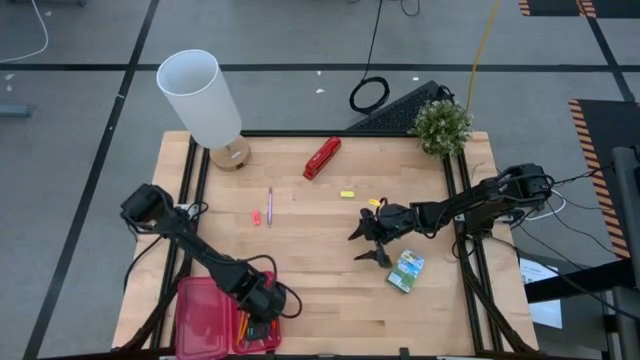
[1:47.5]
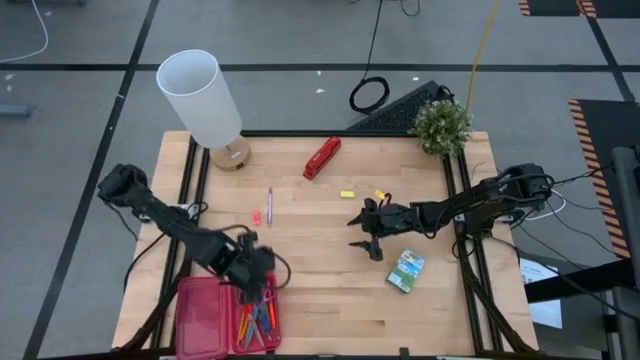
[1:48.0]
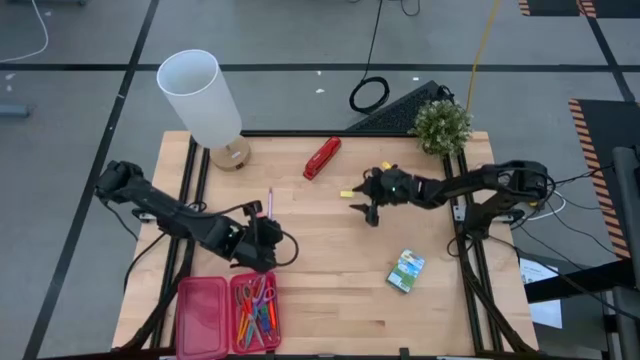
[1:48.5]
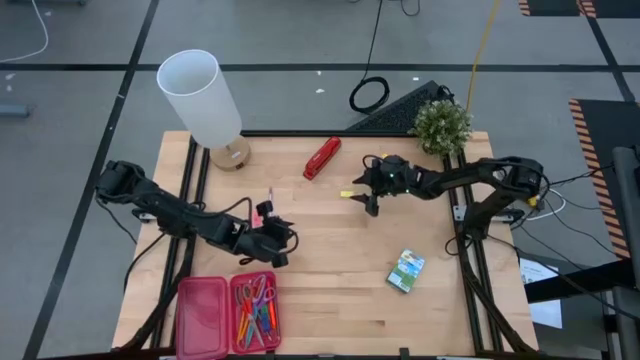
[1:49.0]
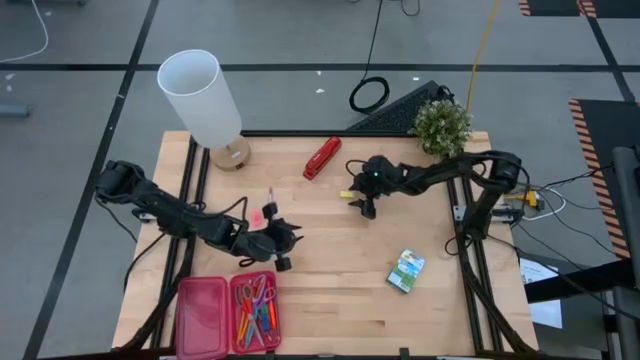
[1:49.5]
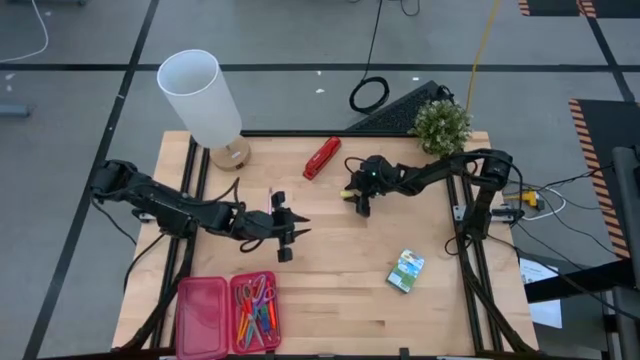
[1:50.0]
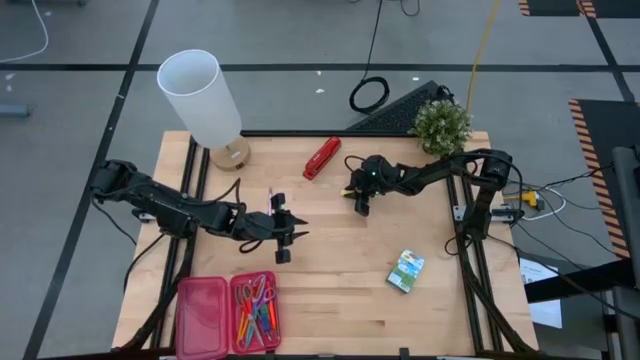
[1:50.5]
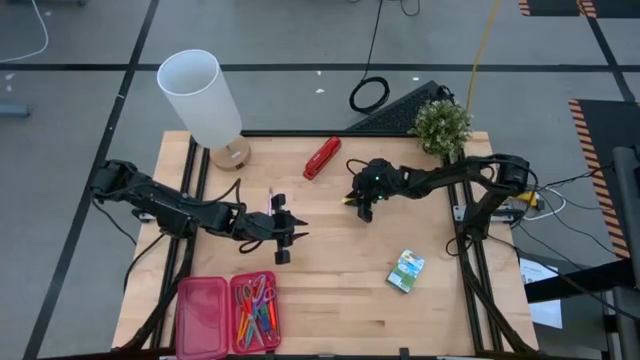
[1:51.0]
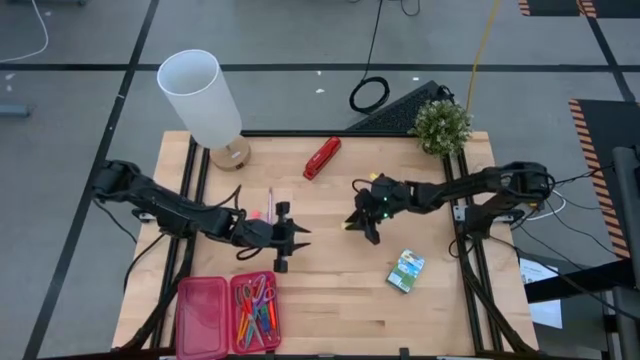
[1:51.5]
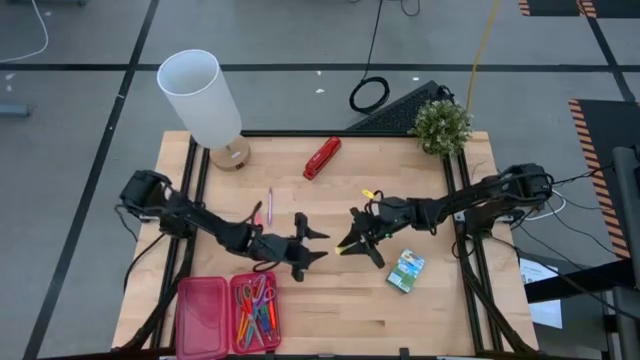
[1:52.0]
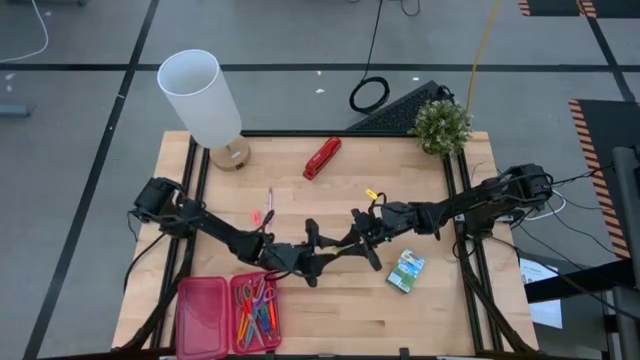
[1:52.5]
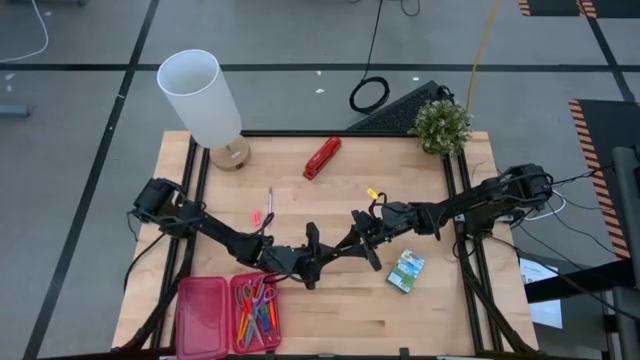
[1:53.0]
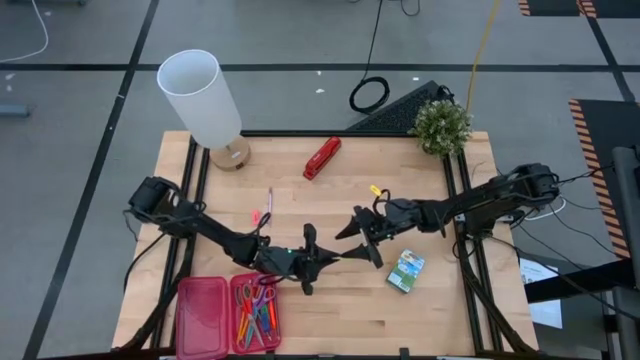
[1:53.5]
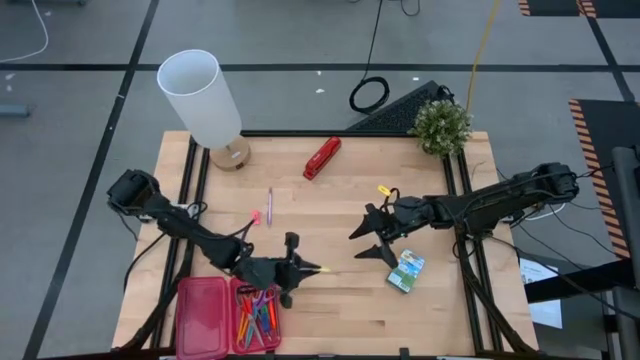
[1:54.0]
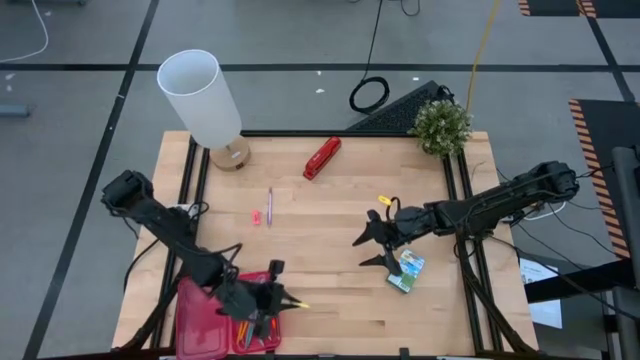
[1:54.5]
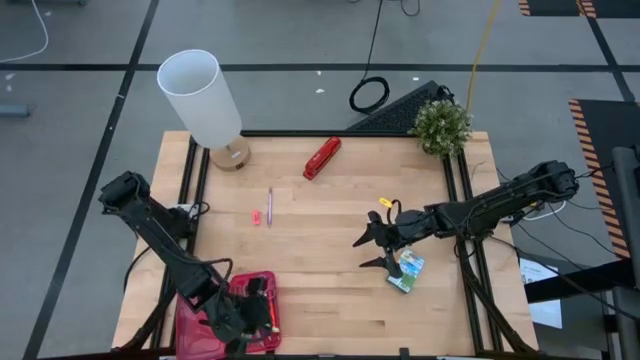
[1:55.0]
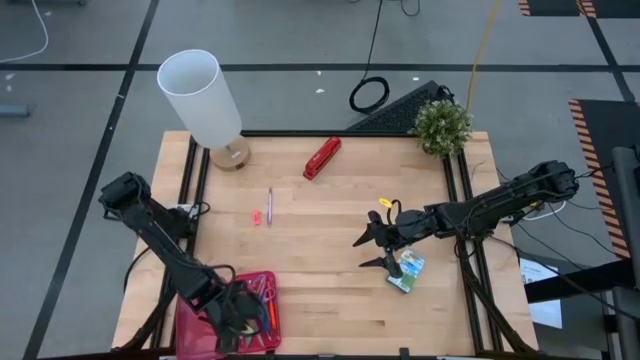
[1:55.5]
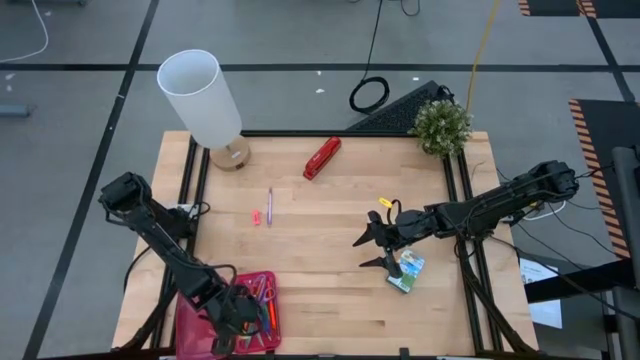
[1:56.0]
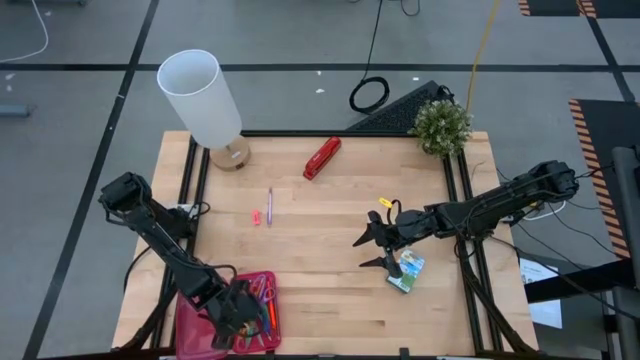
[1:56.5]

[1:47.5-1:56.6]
Task: Pack school essentials
Put the yellow eraser into the red supply box

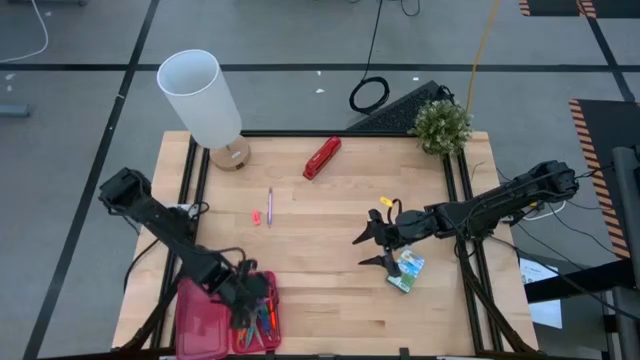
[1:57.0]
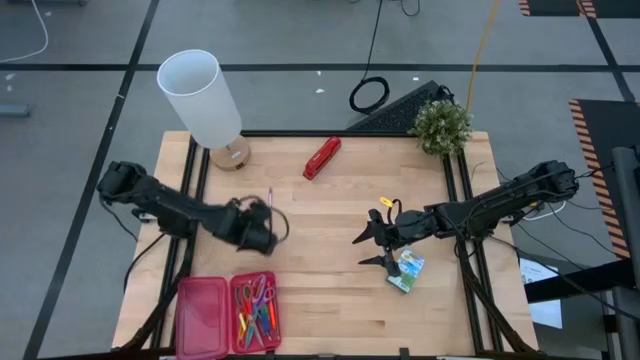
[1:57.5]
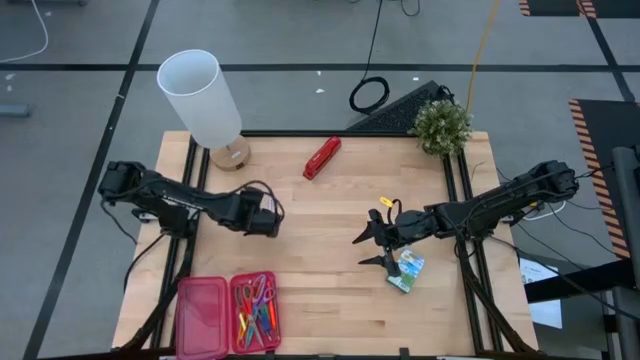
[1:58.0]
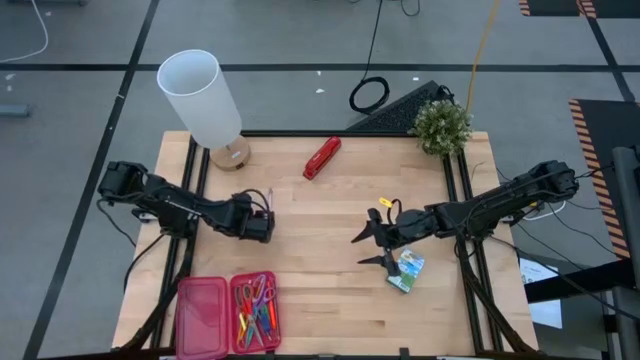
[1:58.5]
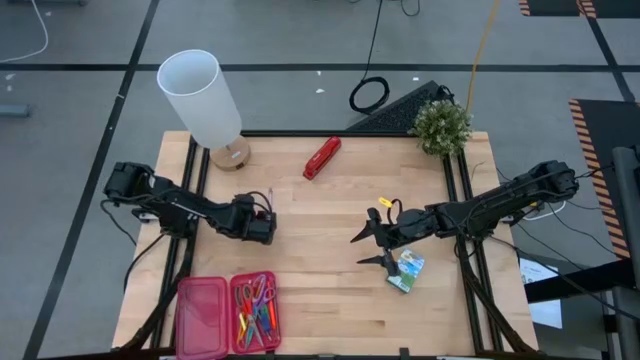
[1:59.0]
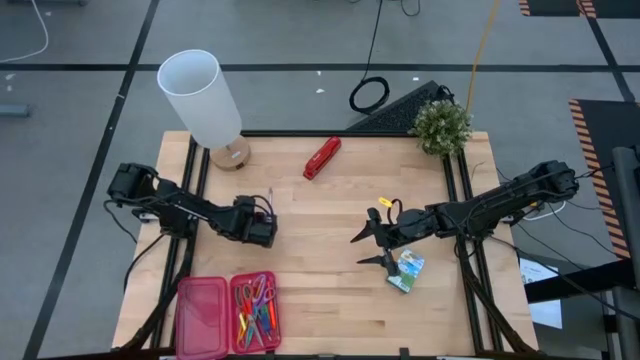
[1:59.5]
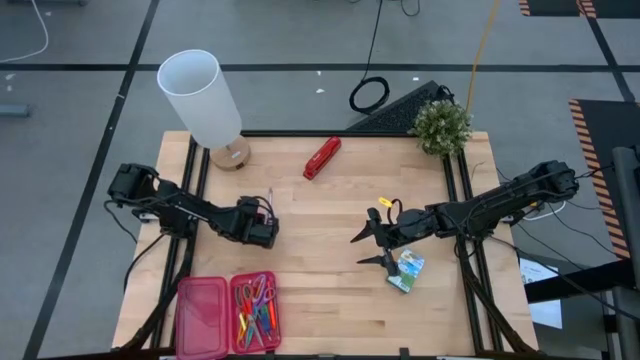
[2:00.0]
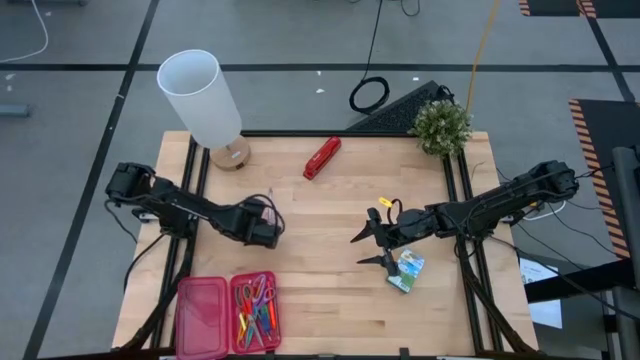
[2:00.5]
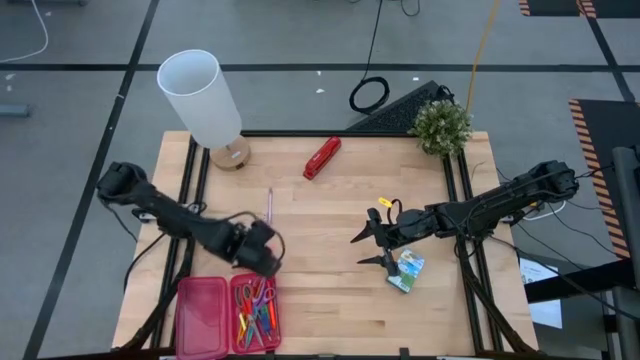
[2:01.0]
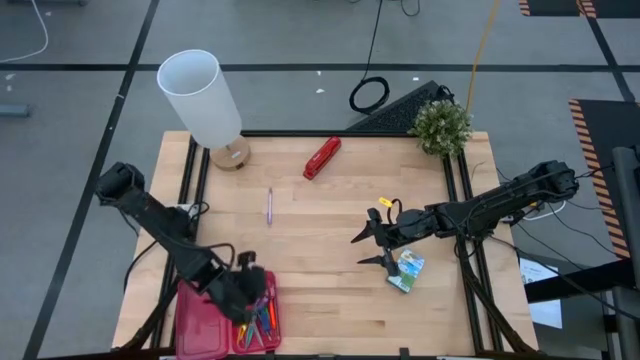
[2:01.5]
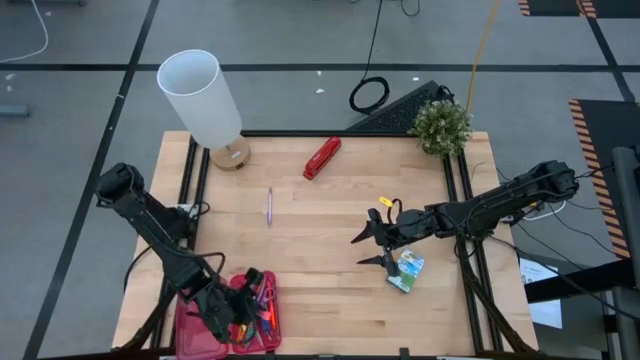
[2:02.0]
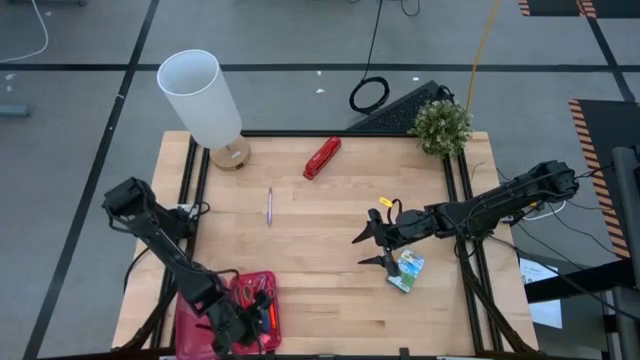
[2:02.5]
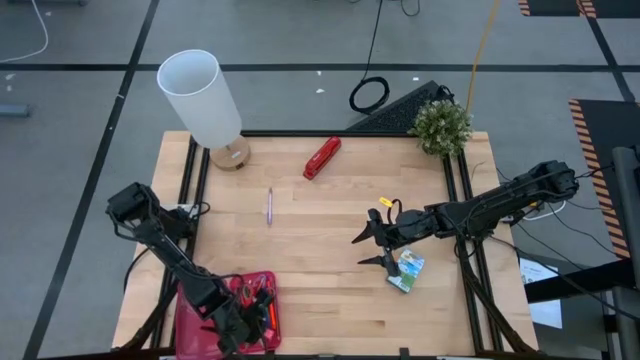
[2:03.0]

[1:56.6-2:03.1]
Put the pink eraser into the red supply box

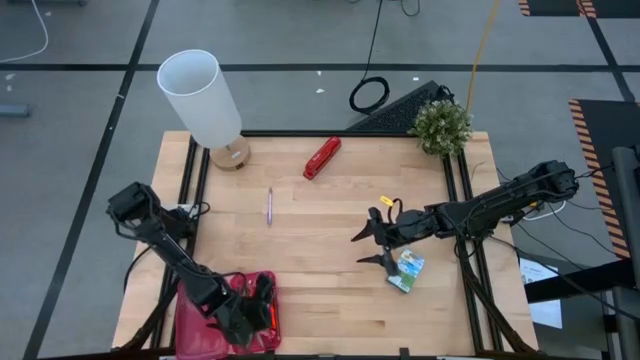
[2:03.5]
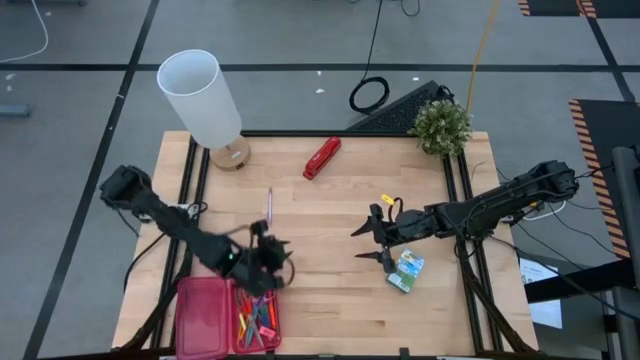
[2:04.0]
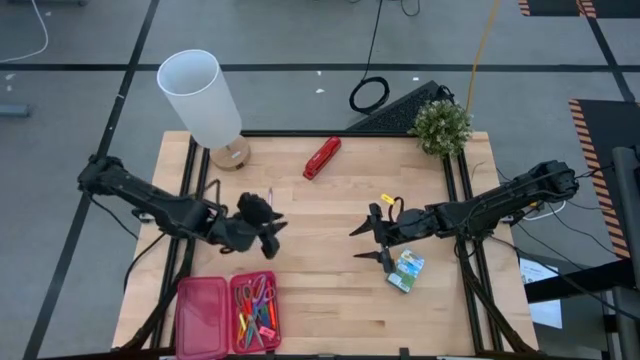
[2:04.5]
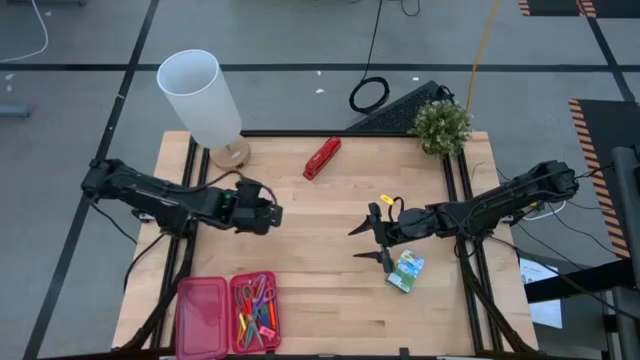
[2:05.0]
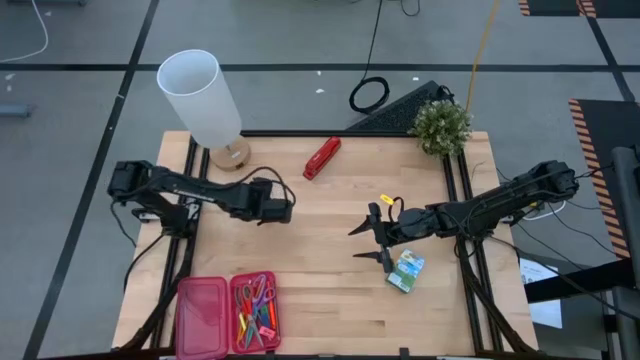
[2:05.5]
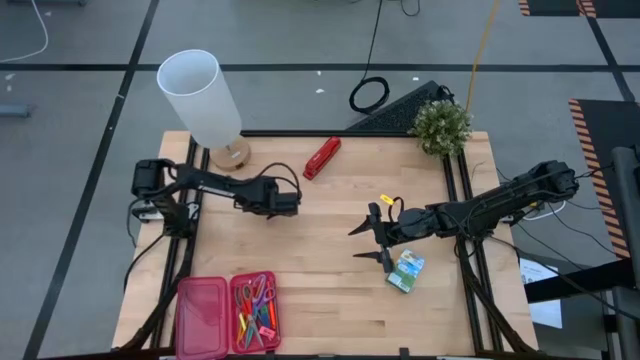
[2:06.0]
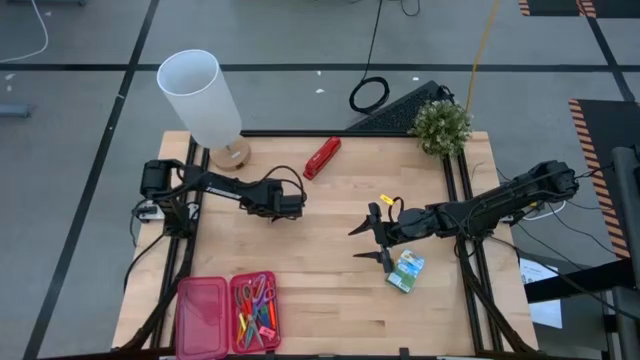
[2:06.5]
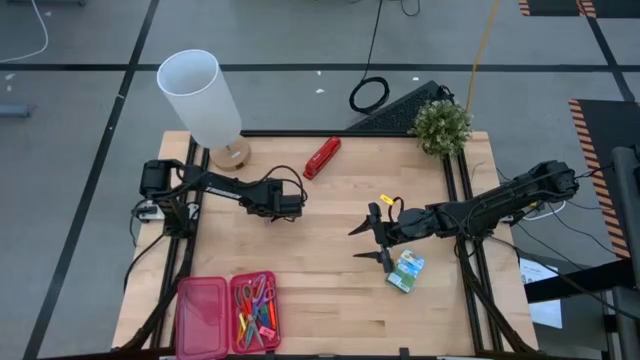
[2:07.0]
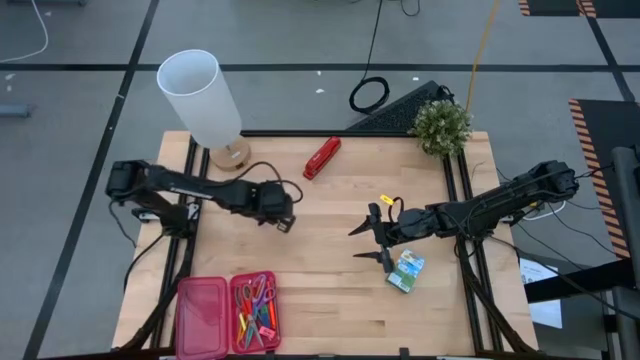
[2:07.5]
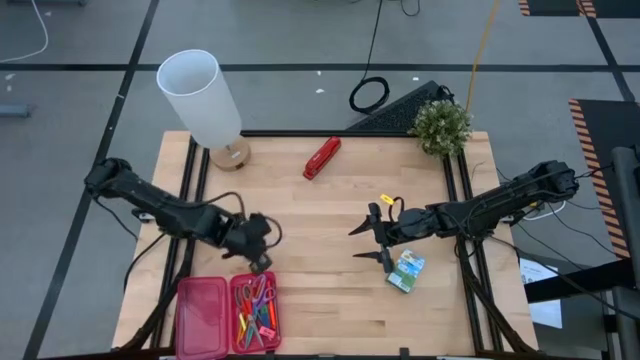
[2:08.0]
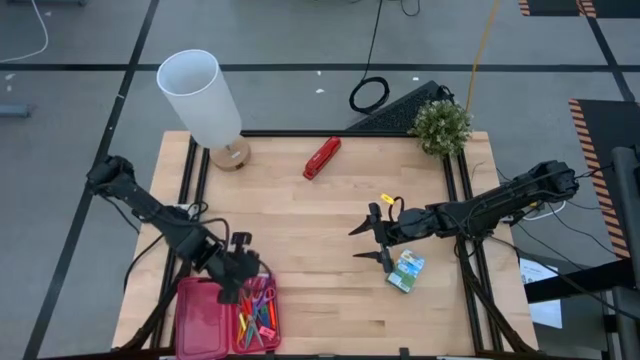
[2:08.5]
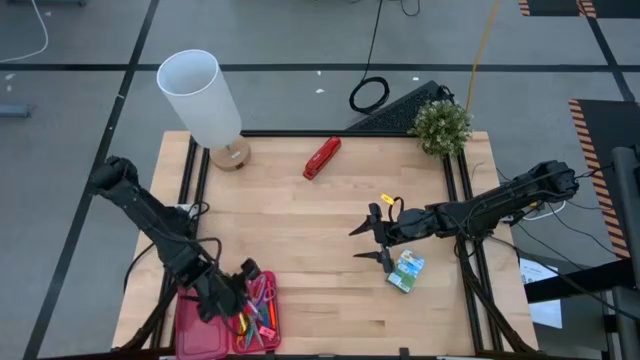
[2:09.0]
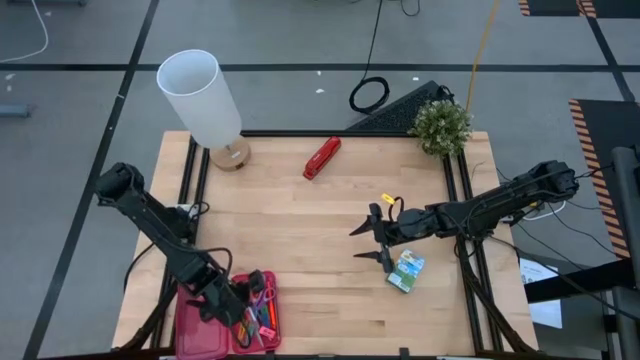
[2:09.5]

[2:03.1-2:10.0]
Put the purple pen into the red supply box
